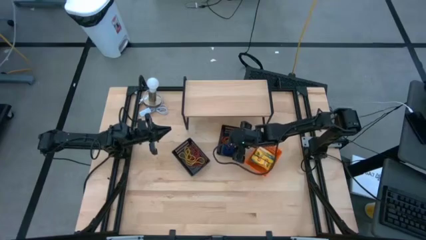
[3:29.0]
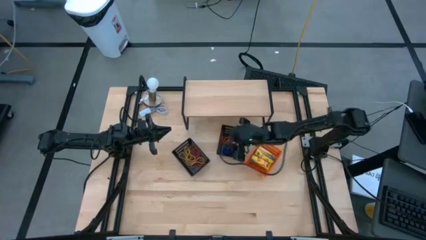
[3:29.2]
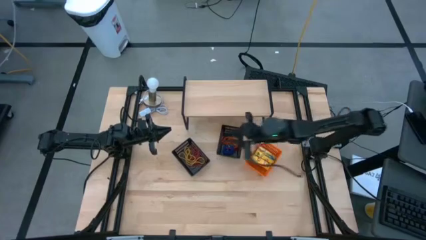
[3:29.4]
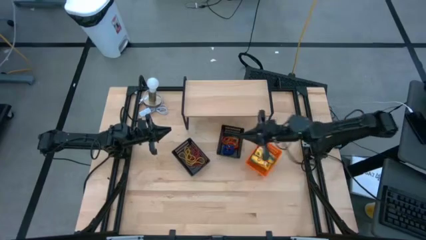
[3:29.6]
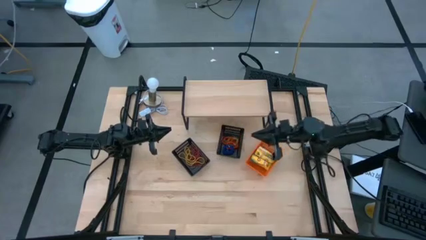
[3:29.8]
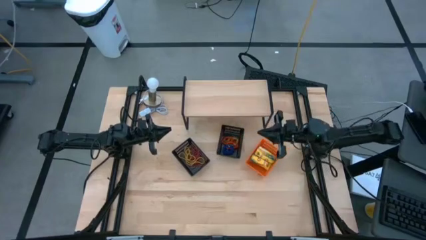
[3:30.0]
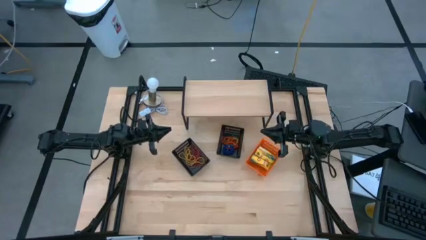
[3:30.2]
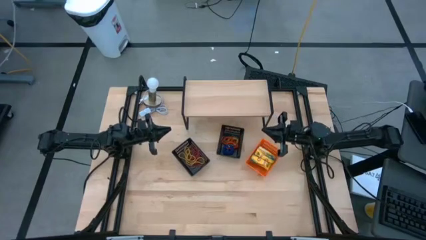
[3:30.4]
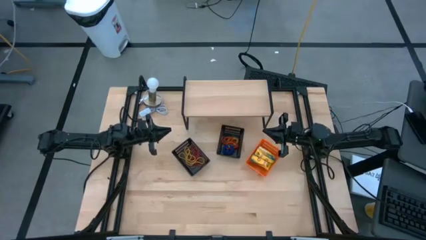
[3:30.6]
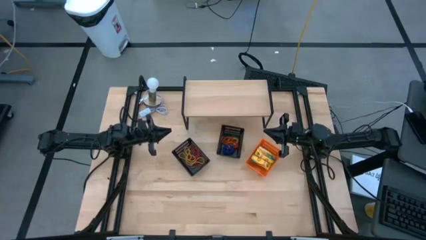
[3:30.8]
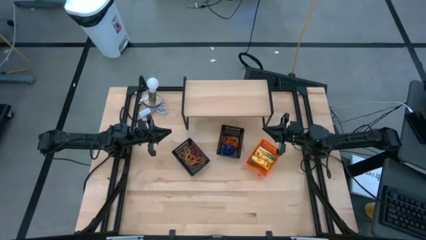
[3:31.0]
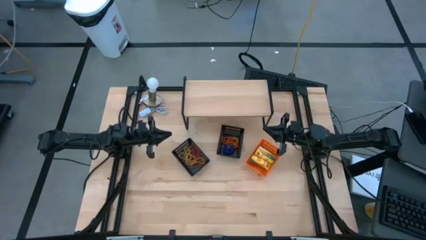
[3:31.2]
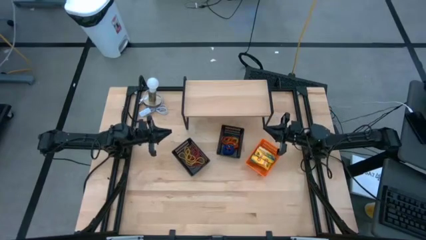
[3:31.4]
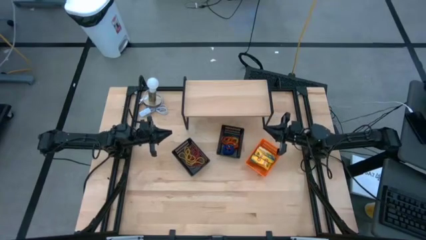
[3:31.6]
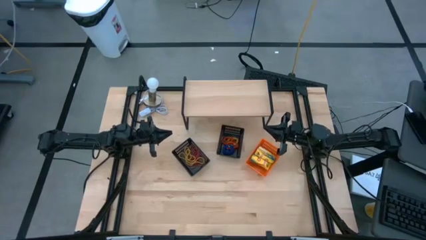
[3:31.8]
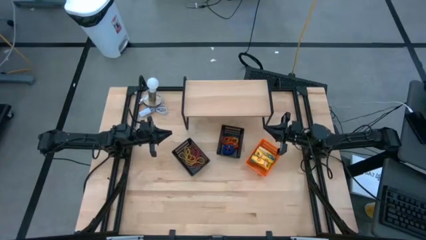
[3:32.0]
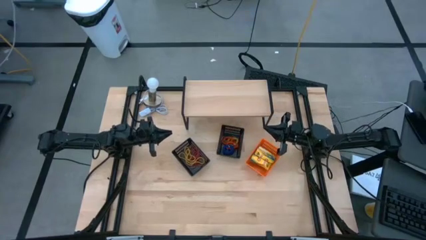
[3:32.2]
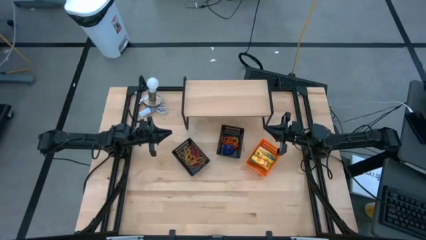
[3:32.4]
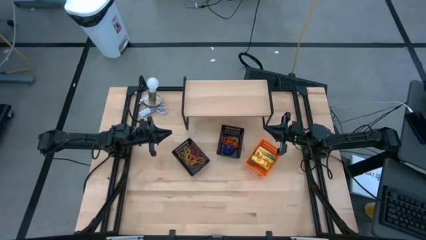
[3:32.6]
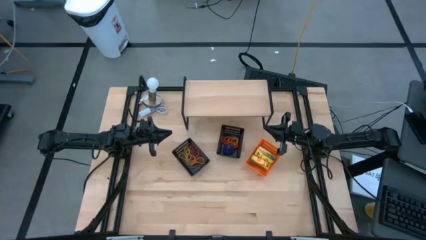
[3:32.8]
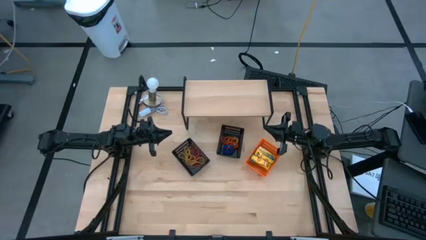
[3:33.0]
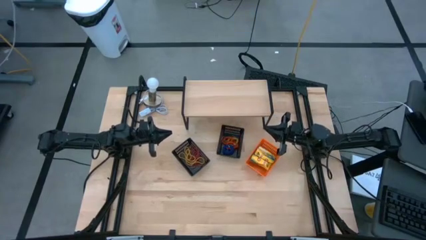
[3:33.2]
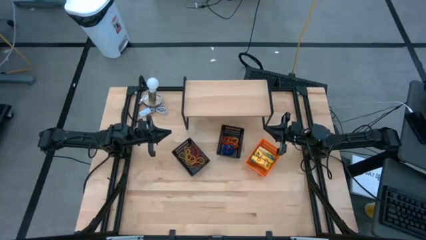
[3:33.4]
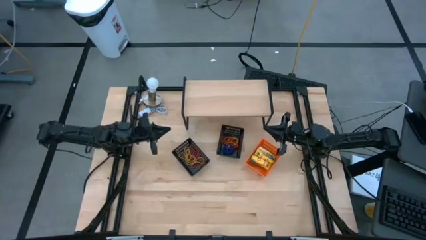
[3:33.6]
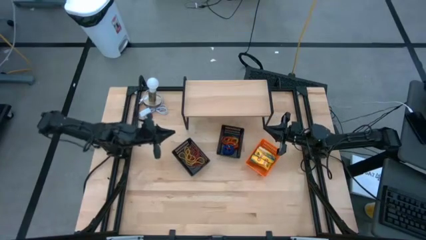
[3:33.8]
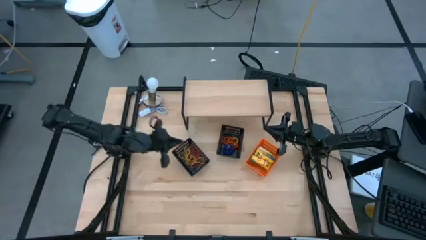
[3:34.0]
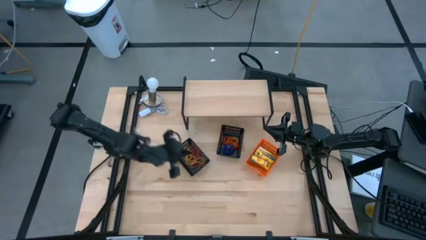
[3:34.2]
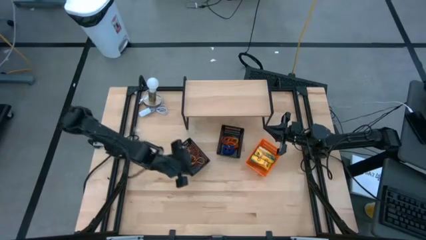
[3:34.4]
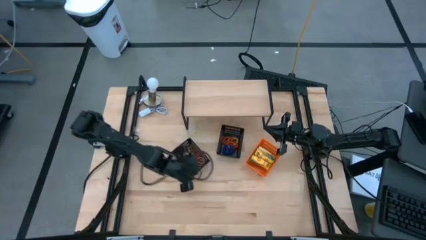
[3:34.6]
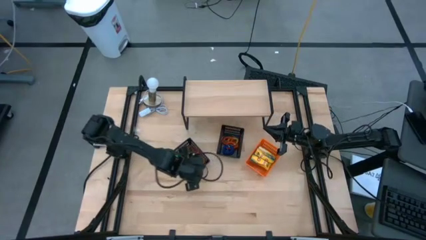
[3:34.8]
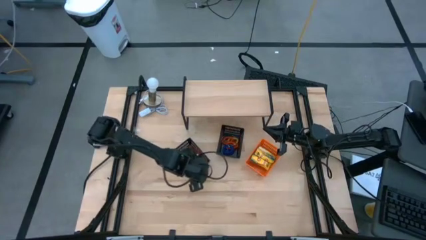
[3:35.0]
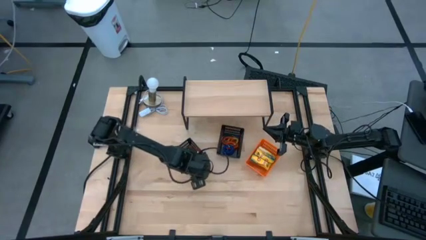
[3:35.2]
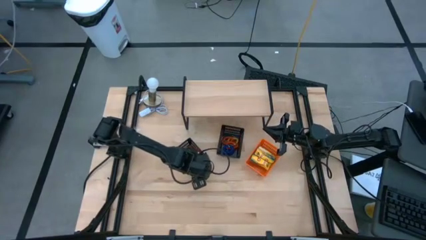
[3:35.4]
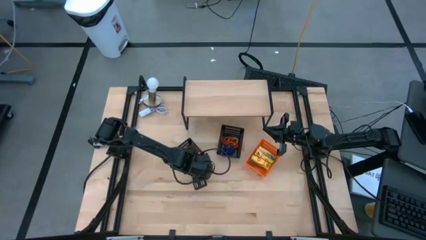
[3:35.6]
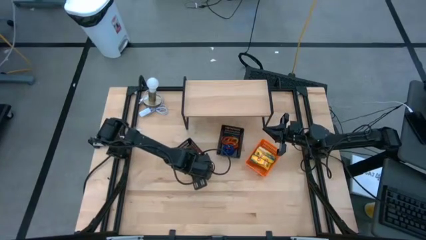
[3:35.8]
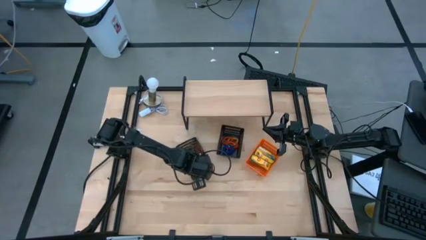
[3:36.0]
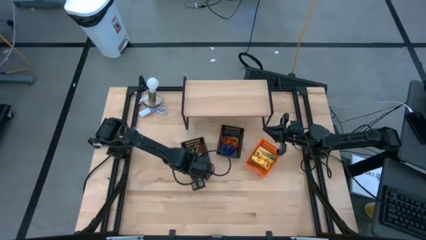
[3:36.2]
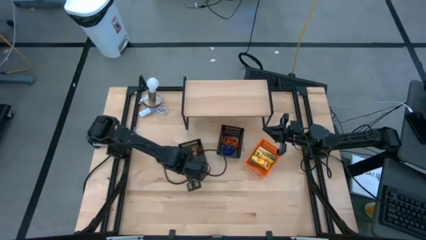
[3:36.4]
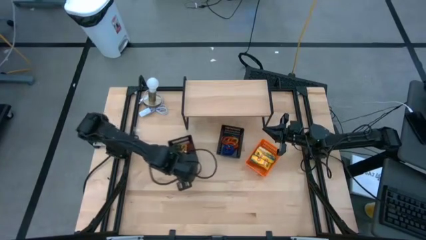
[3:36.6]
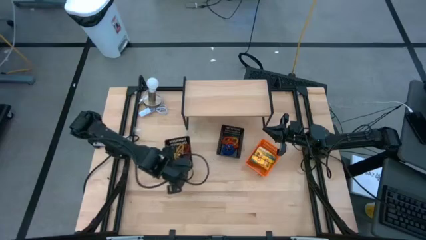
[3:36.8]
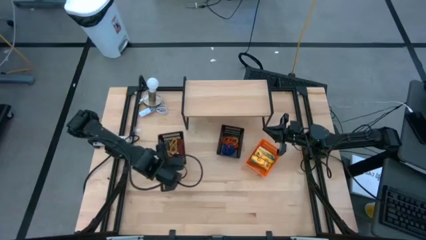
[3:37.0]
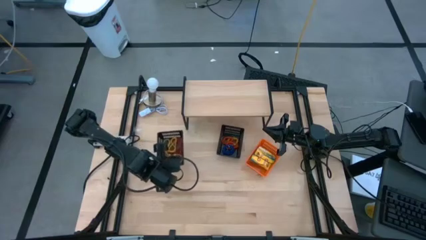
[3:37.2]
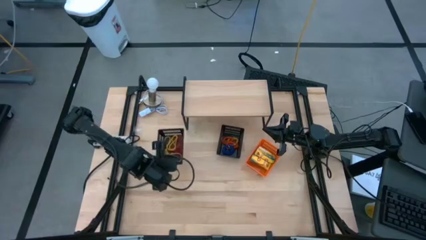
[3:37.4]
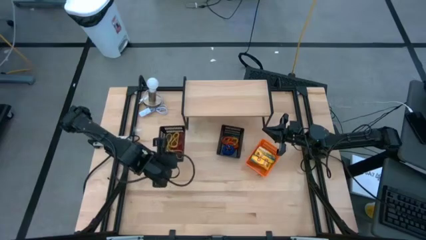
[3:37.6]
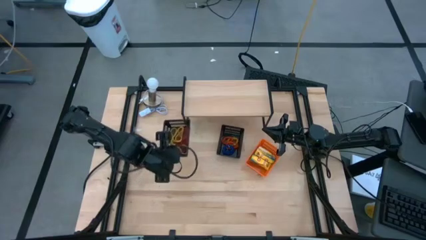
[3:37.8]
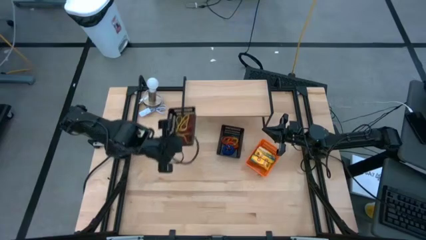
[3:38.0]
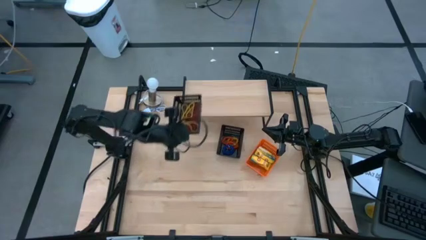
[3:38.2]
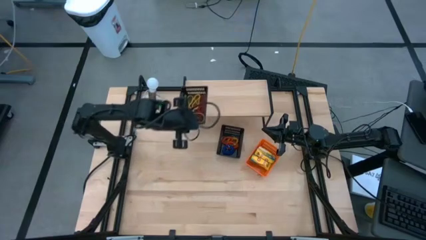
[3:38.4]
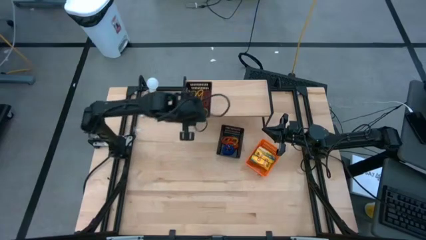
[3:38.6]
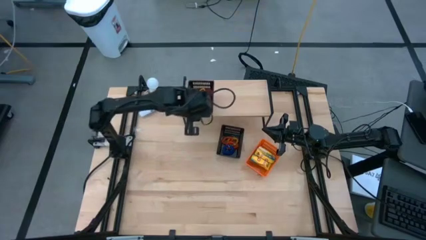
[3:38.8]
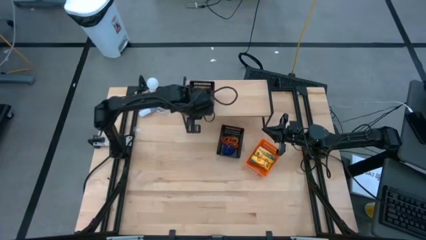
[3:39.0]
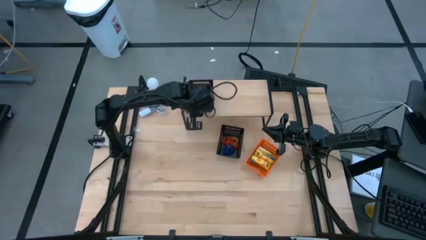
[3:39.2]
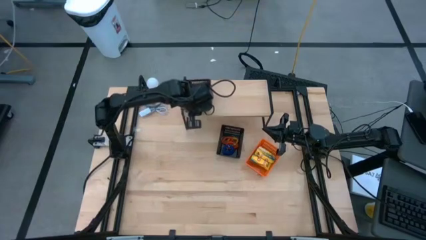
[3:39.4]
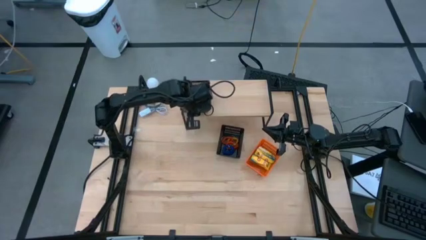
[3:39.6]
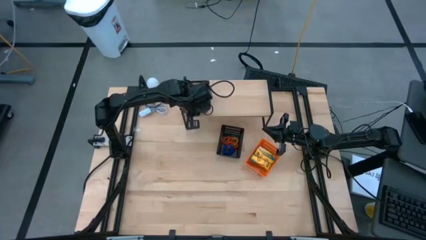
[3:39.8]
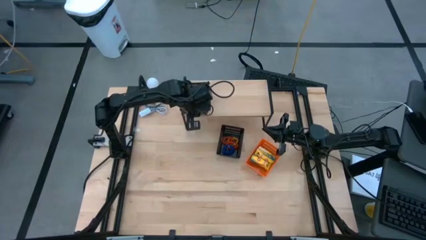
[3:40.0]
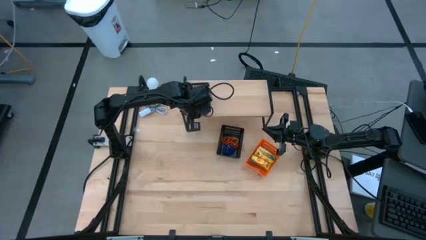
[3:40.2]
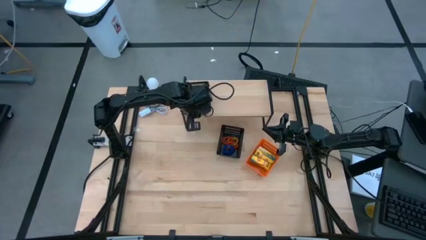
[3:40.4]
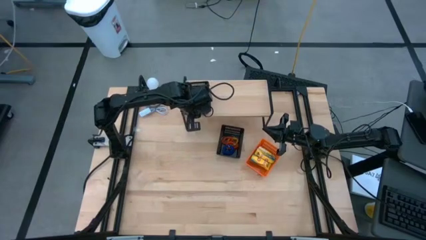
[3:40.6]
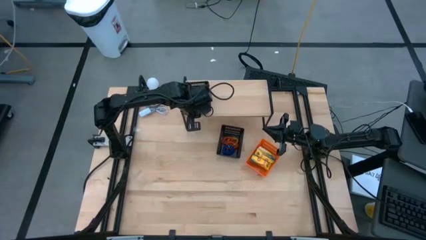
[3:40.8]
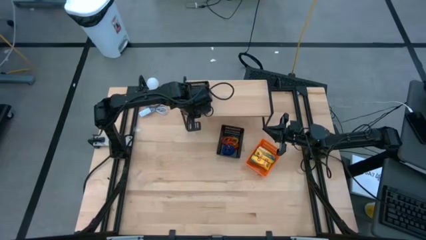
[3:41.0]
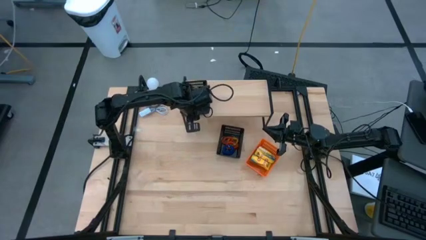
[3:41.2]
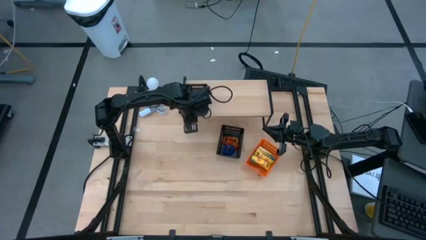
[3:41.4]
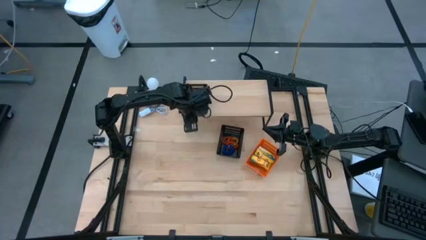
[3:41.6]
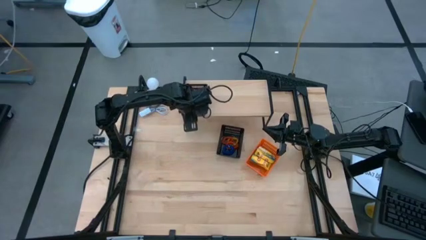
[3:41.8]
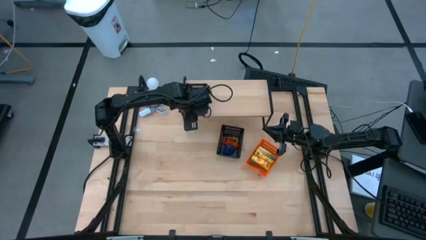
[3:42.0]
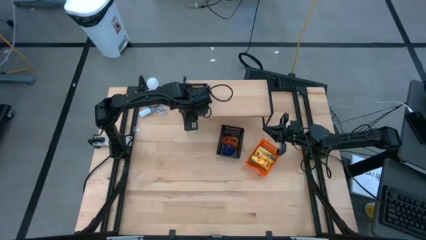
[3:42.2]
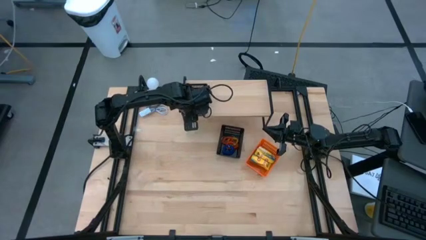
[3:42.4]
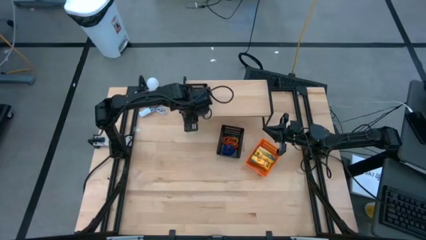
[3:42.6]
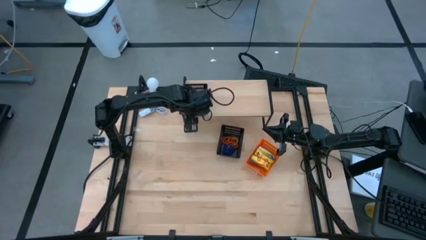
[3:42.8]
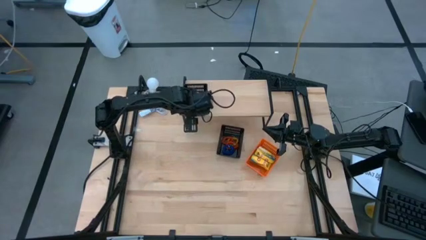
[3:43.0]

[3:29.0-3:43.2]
Task: Pick & Place Office Desk Supplies
Put the left black bin filled with rubber bands on the shelf
